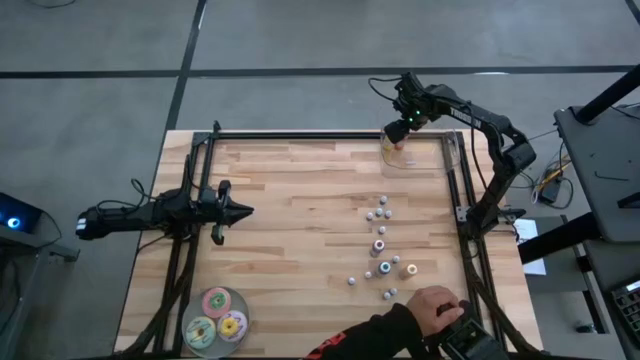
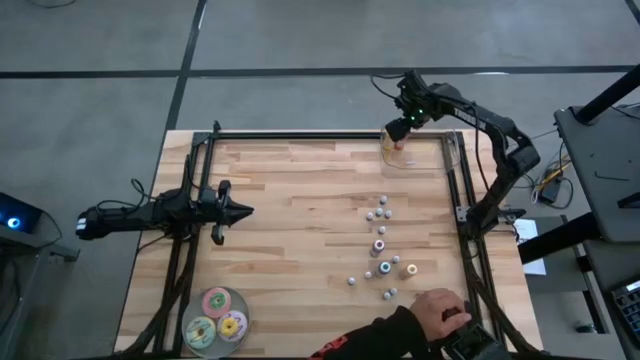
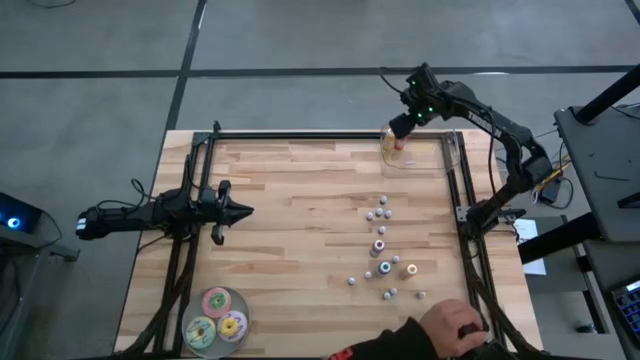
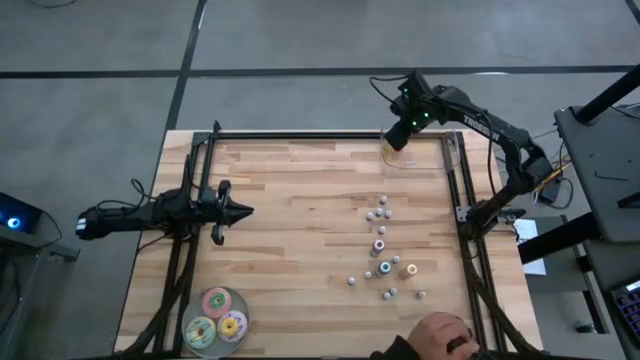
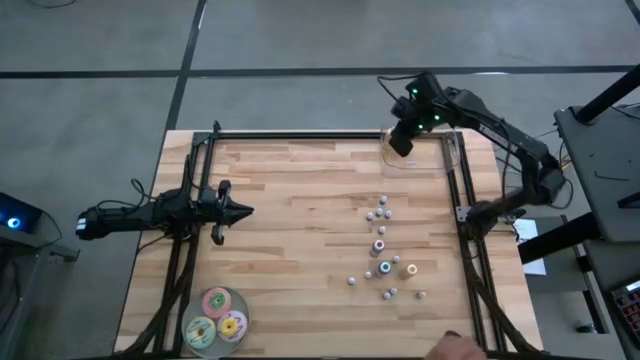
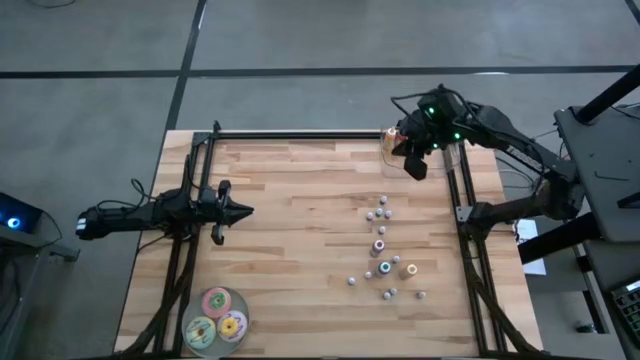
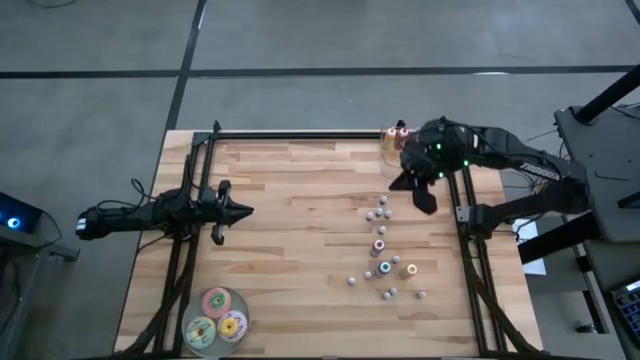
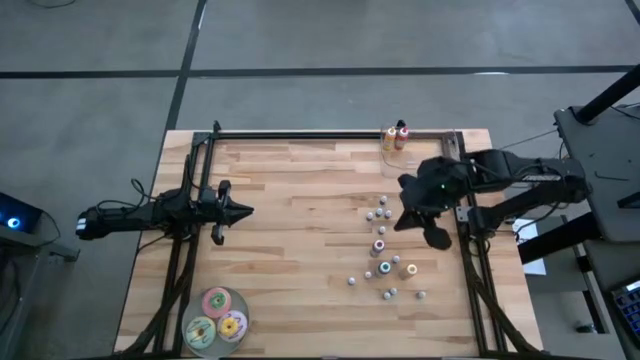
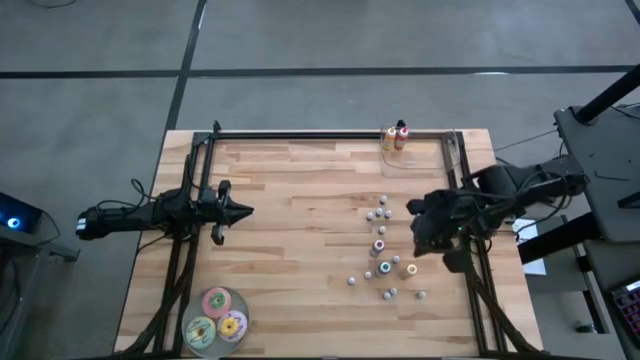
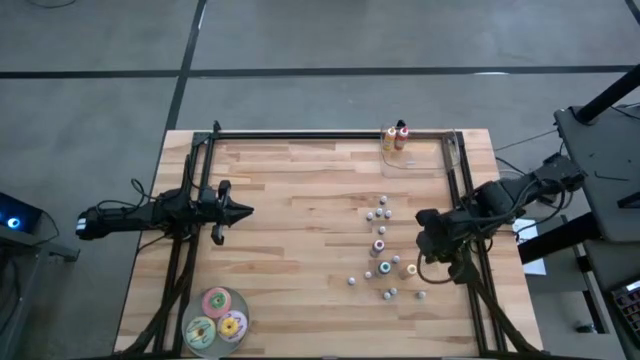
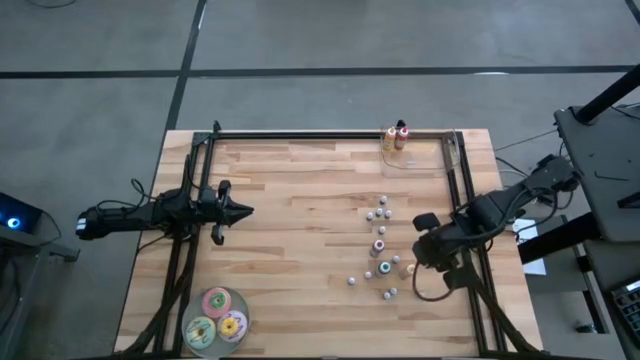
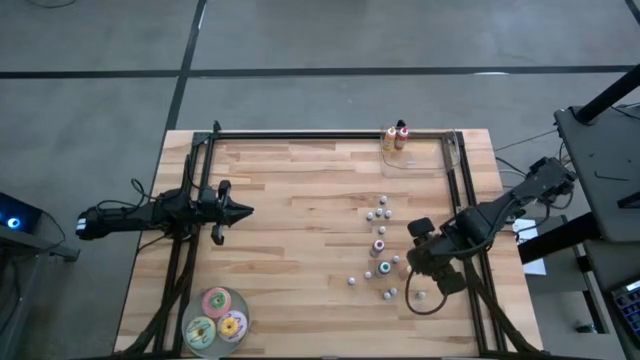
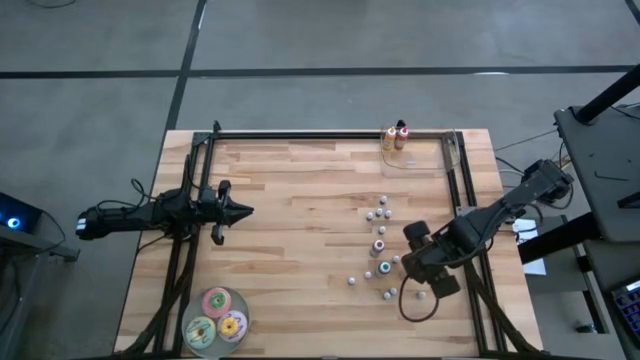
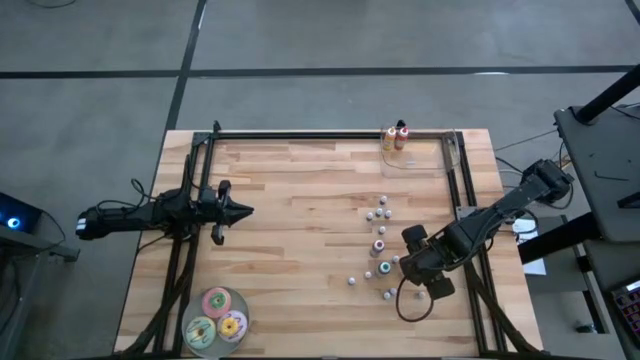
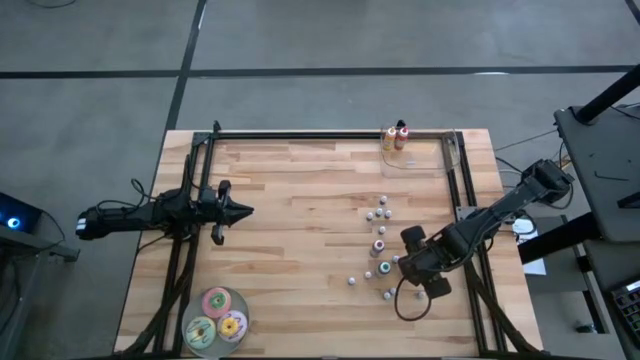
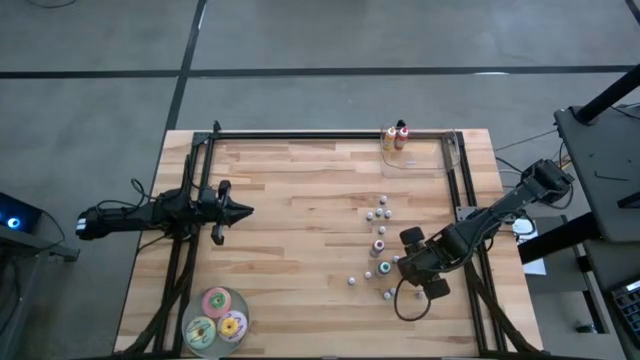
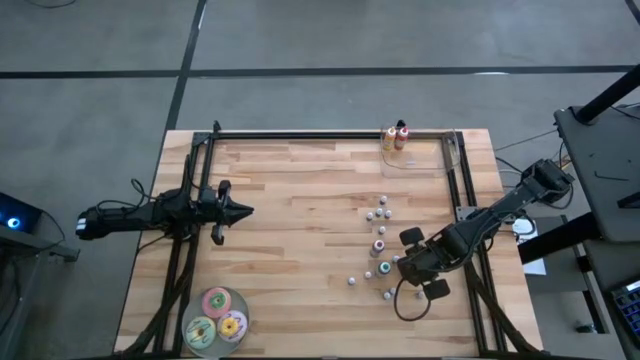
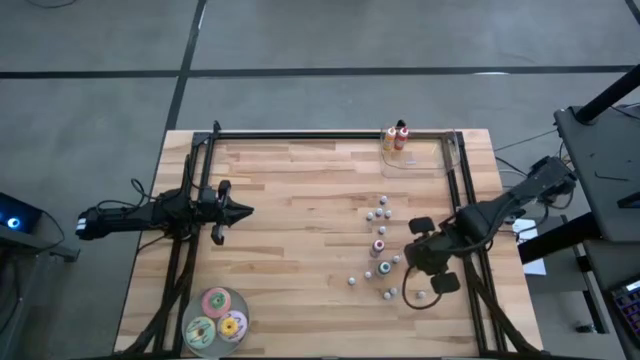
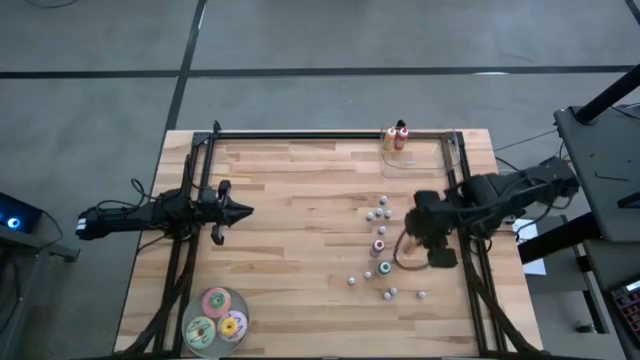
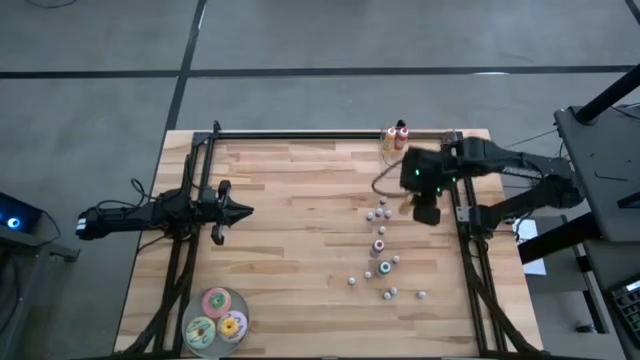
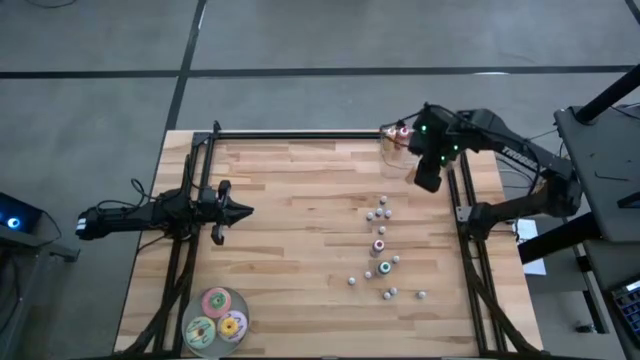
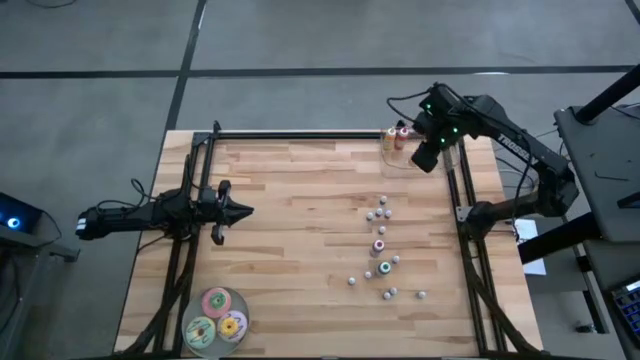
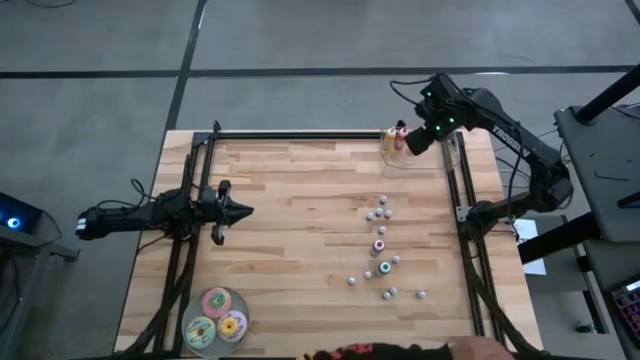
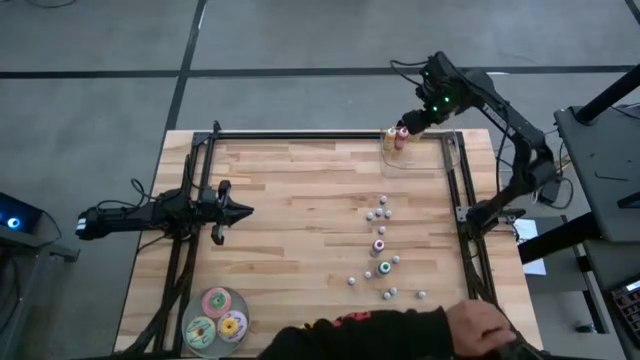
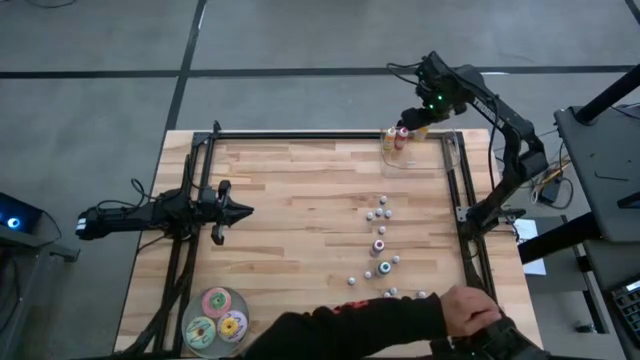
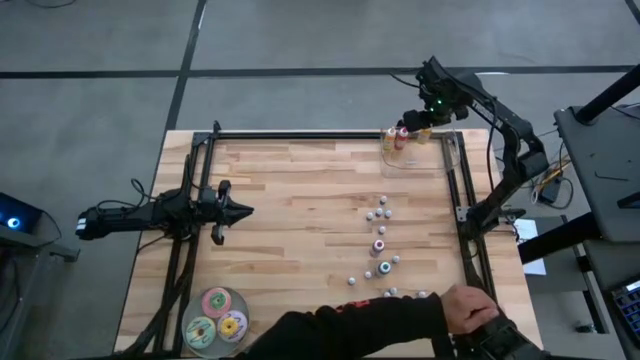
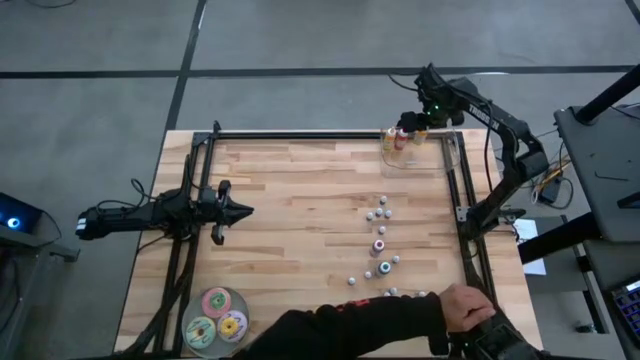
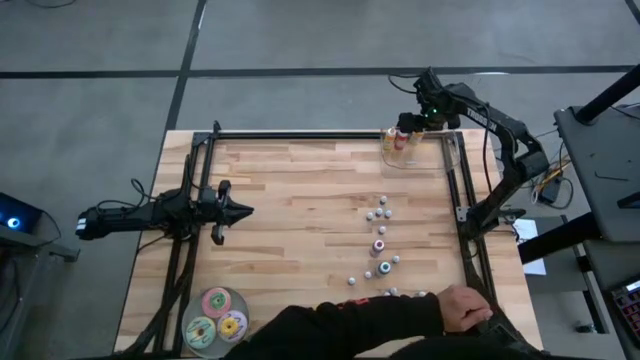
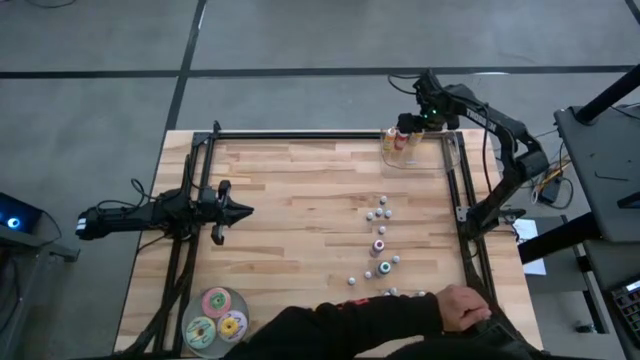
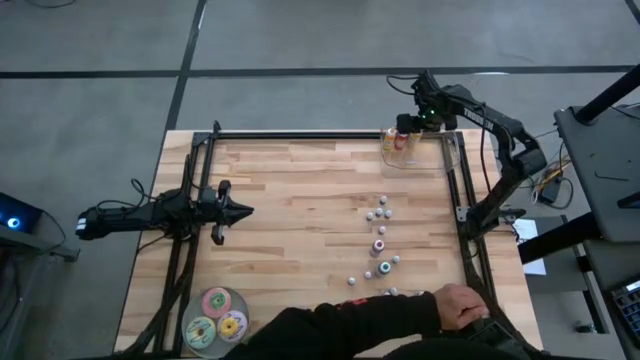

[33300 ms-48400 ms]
Task: Pick & Place food coloring
Put the big yellow food coloring bottle into the bin

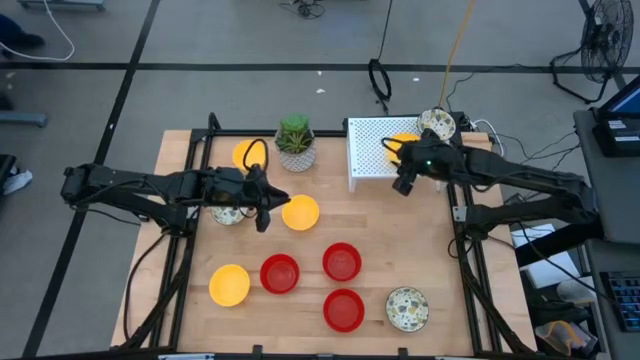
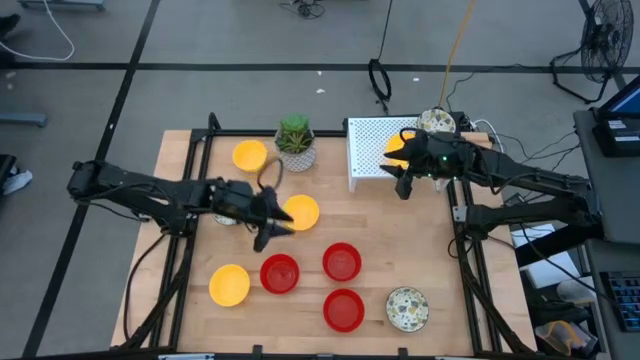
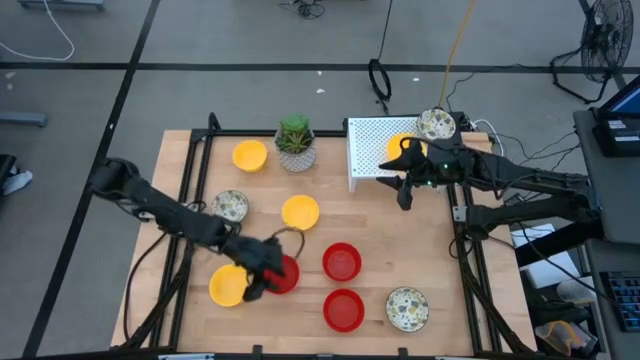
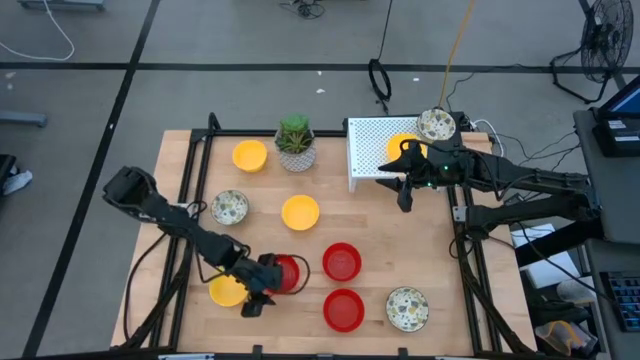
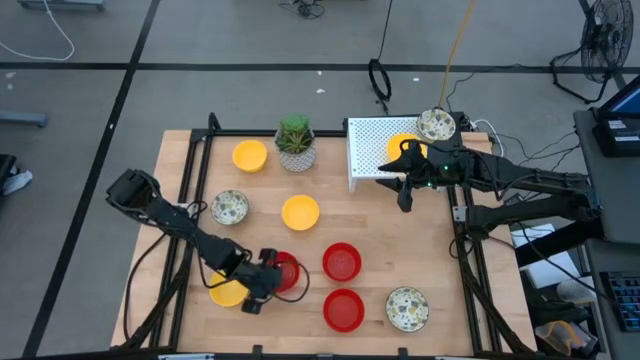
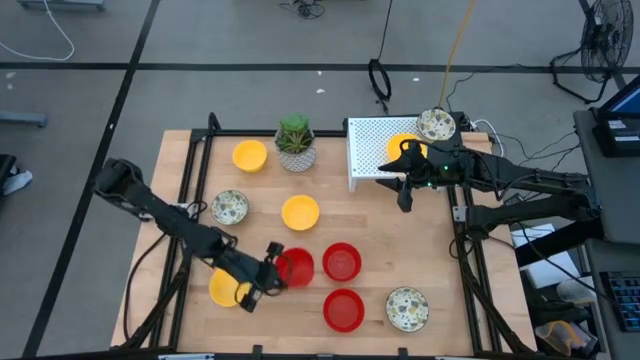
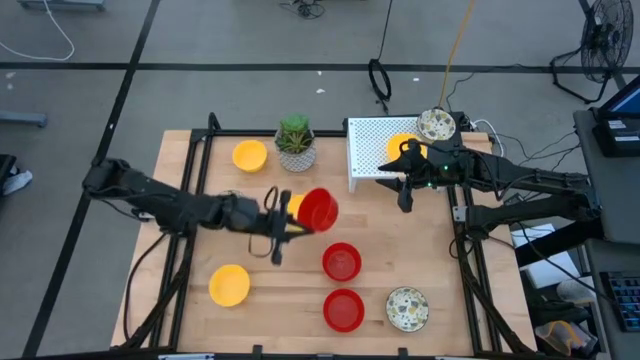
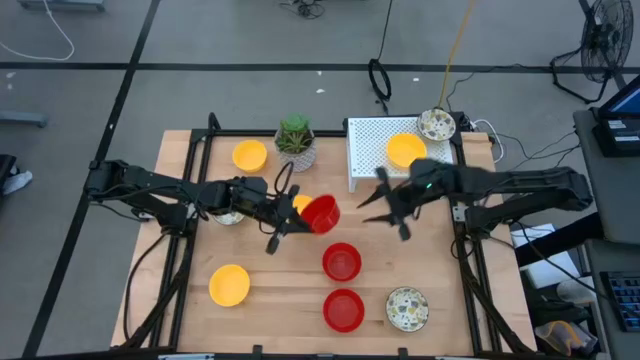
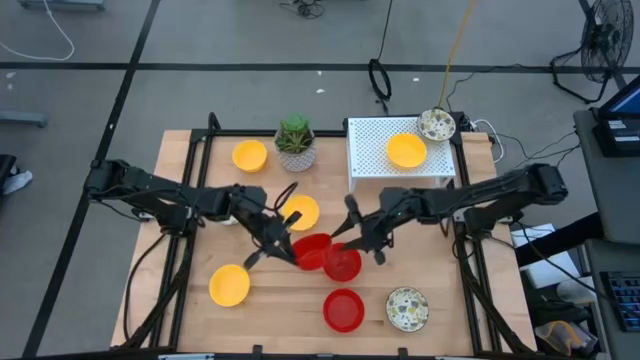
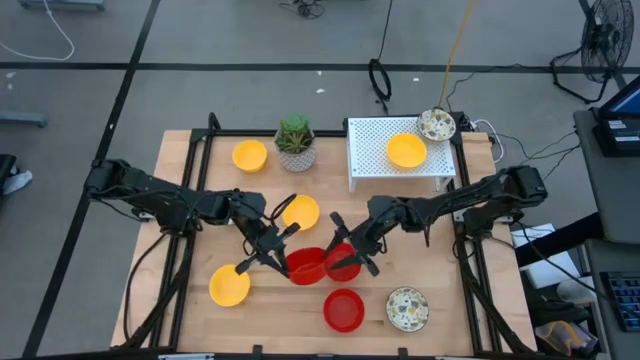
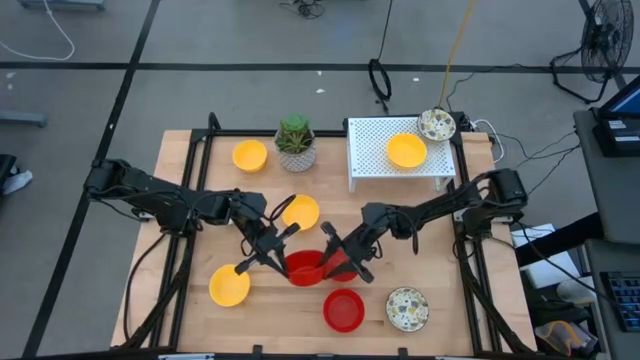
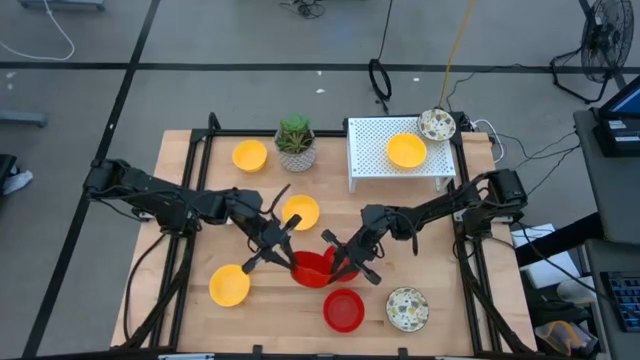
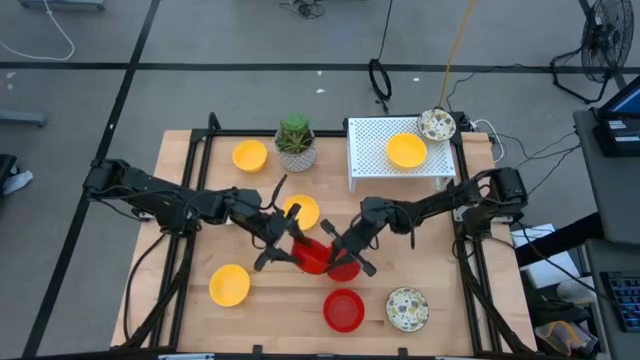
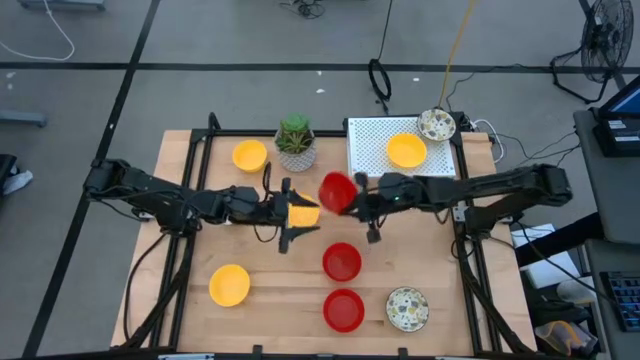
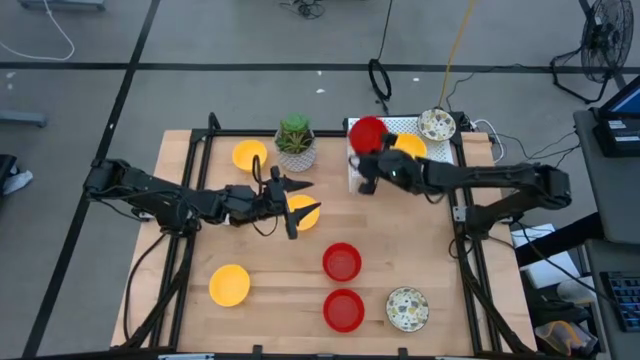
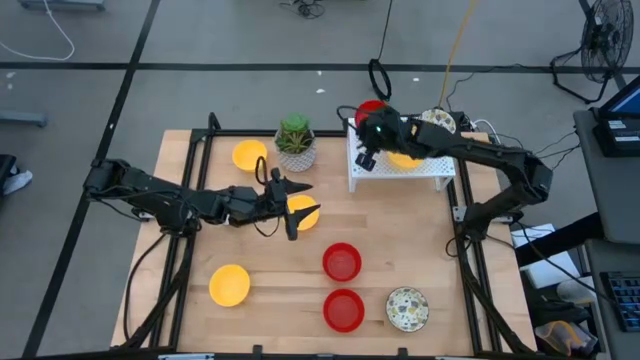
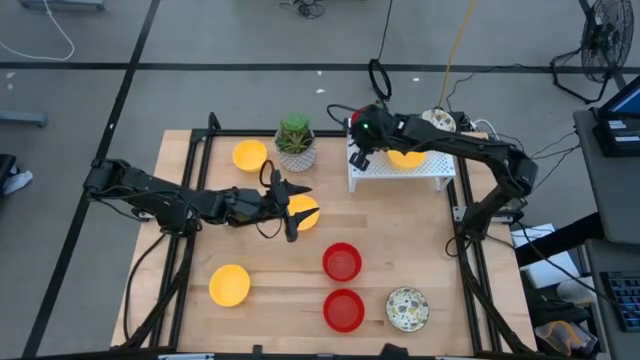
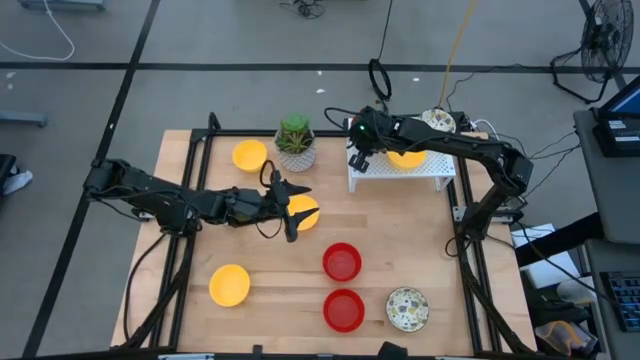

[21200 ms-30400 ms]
Task: Pick & Place Mini bowls
Put the red bowl on the shelf
